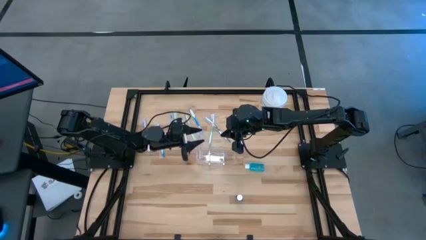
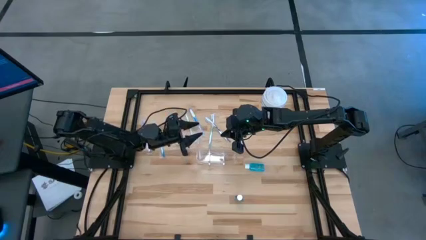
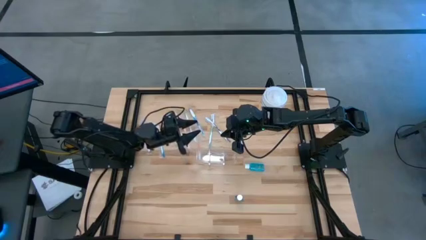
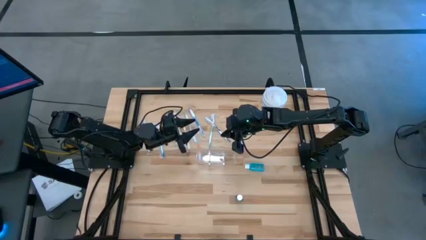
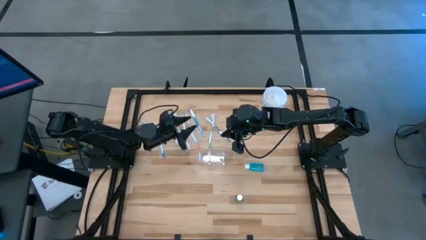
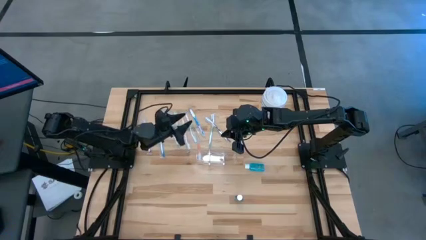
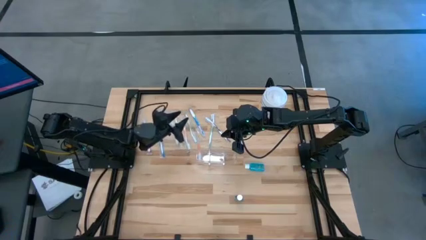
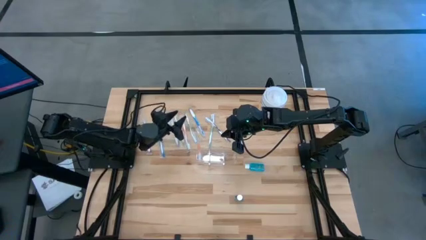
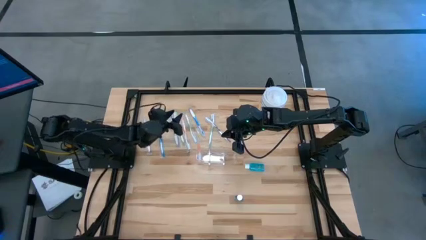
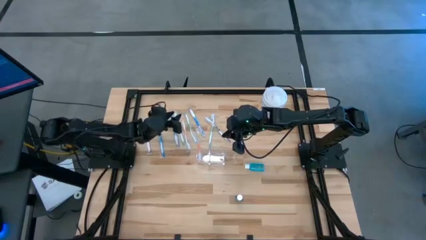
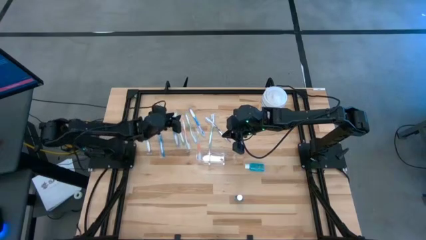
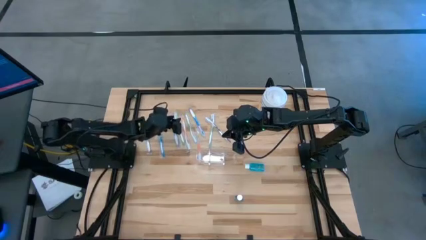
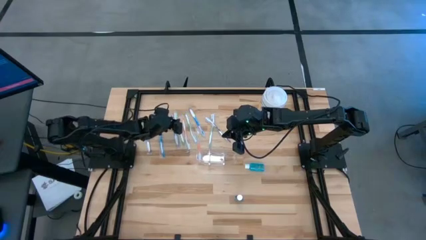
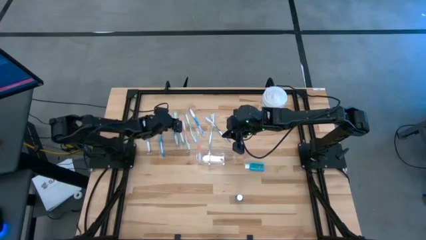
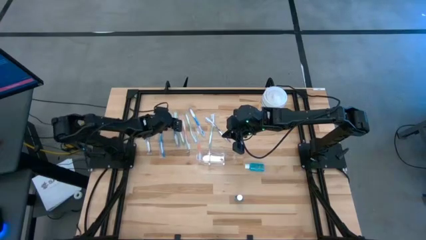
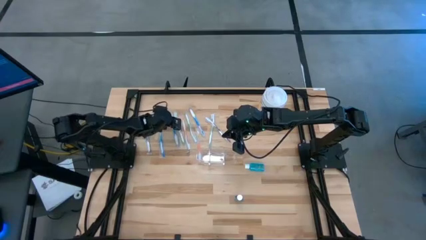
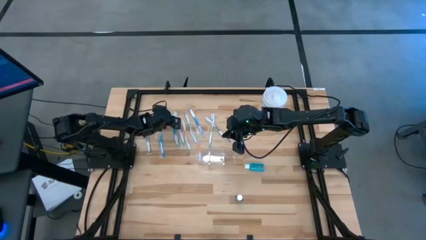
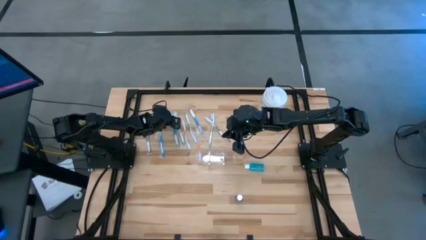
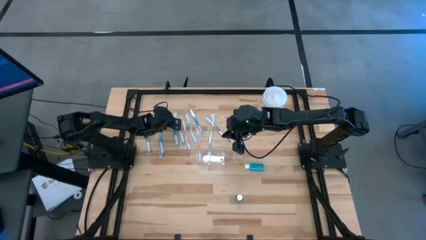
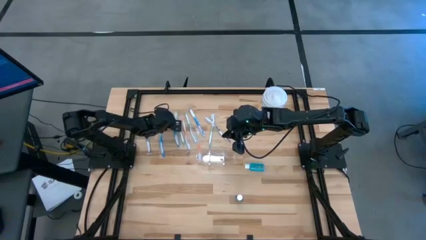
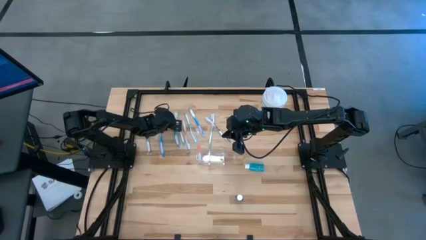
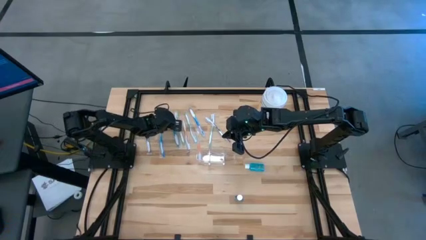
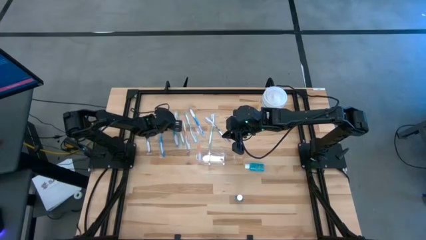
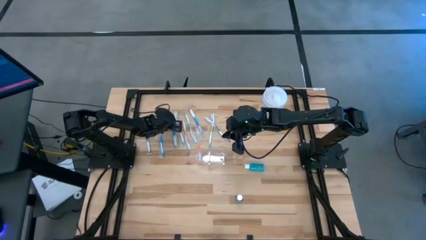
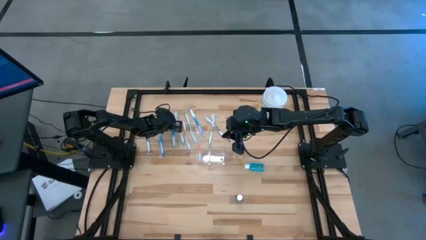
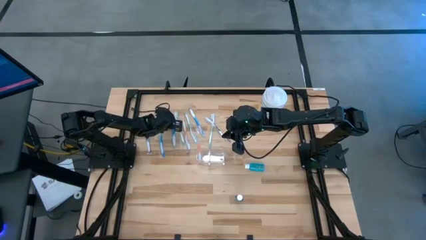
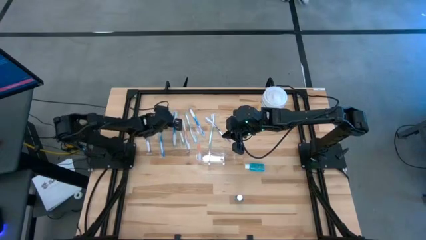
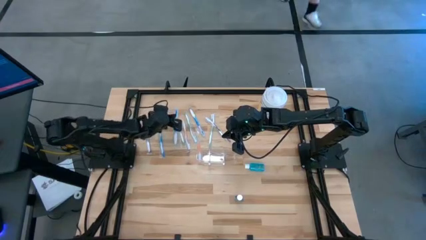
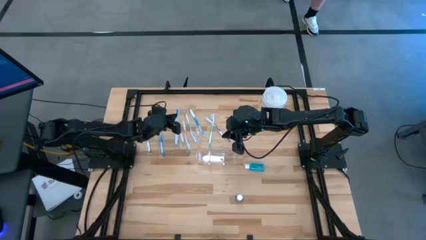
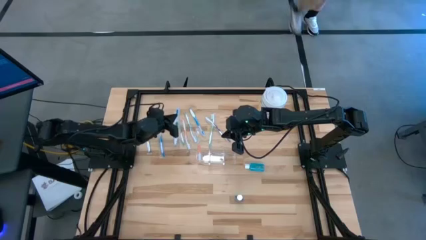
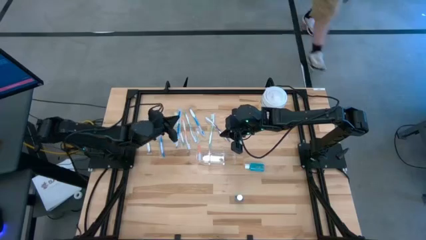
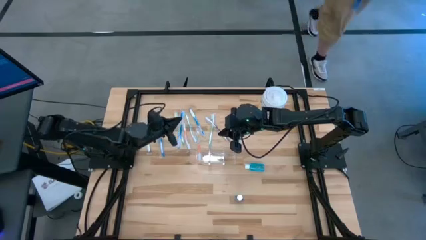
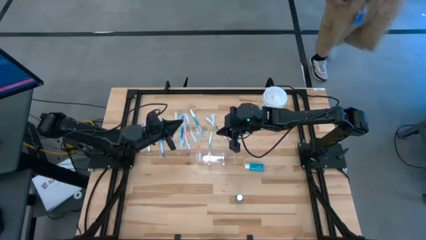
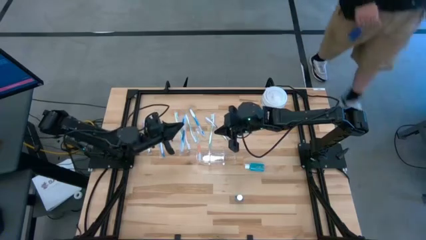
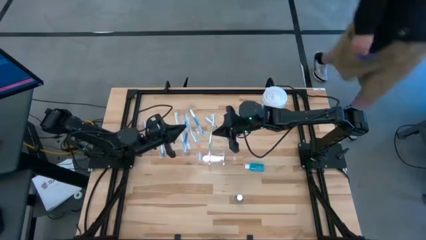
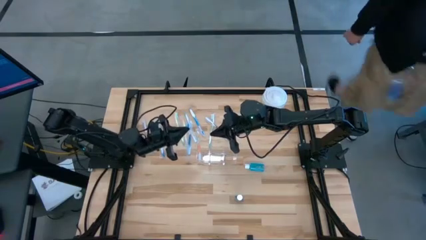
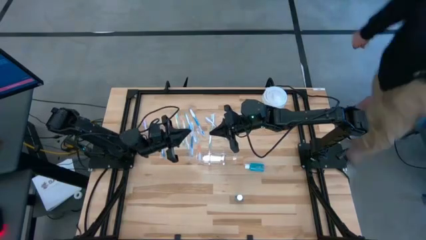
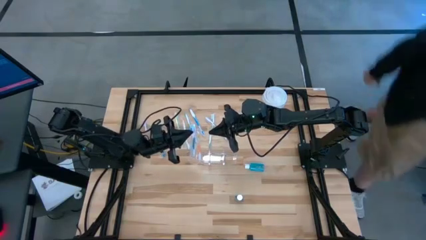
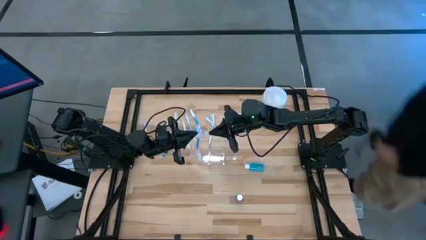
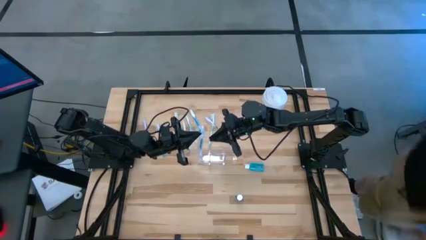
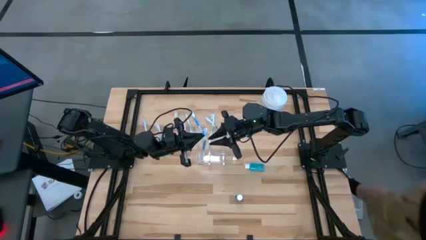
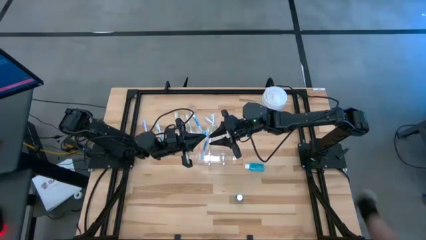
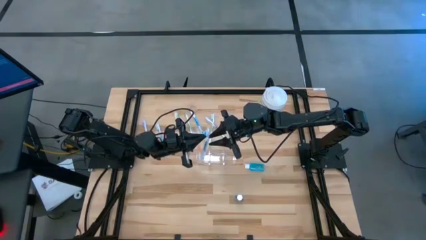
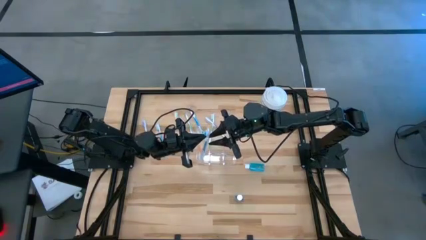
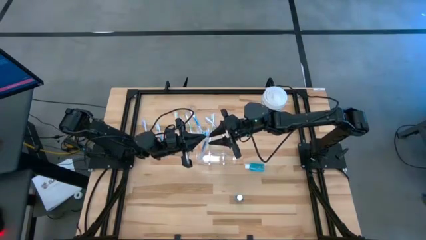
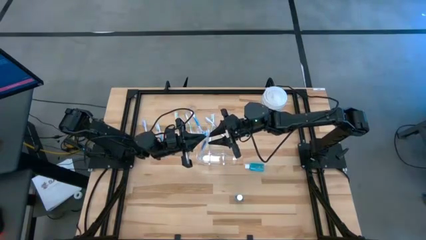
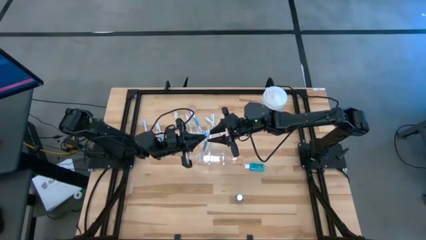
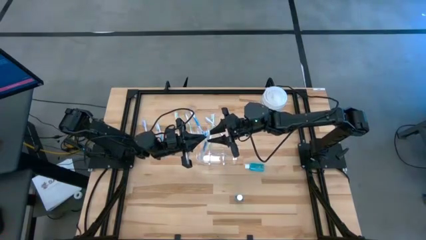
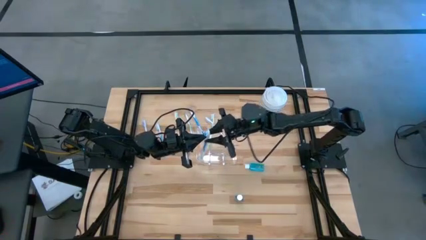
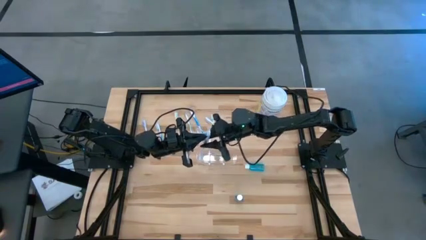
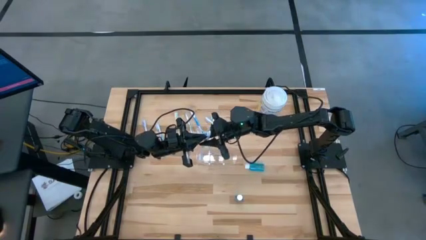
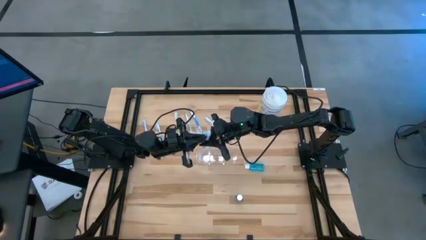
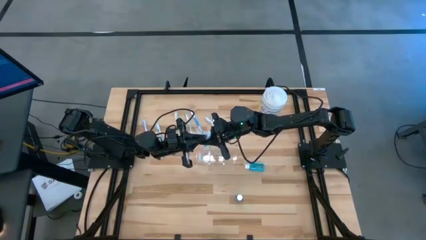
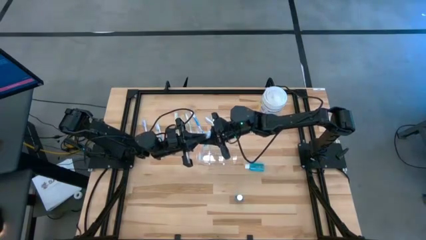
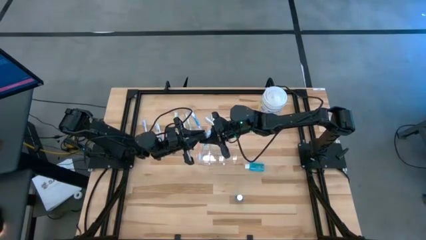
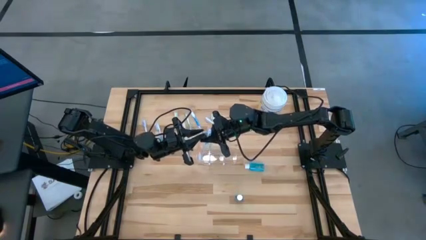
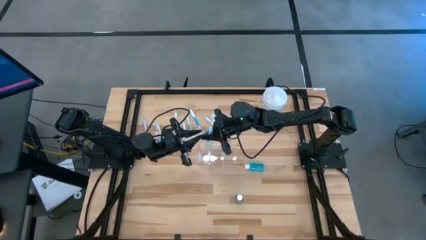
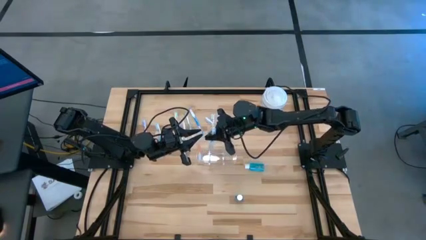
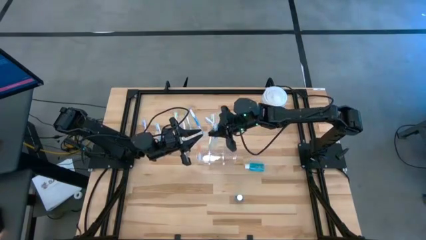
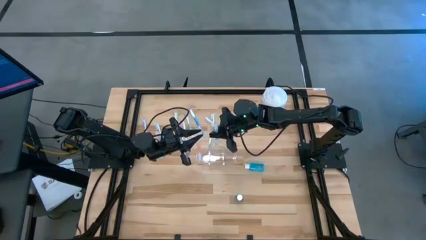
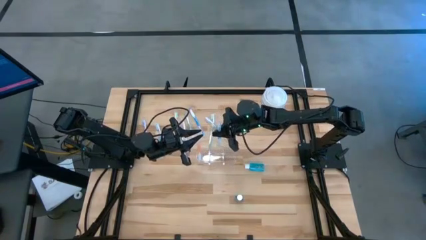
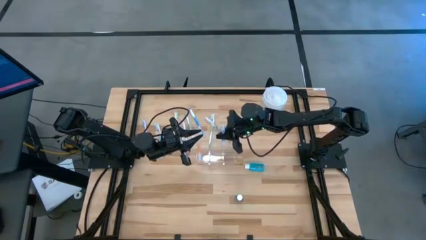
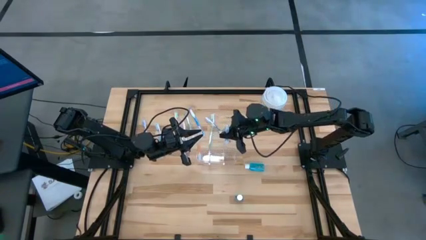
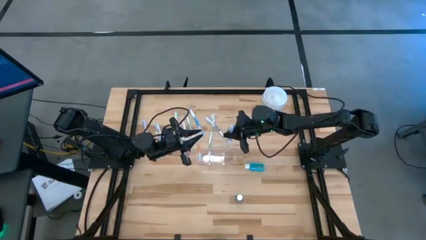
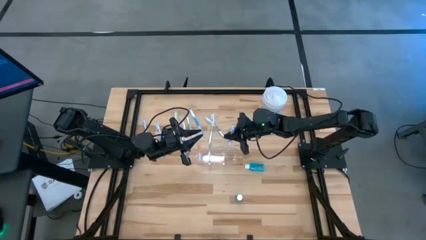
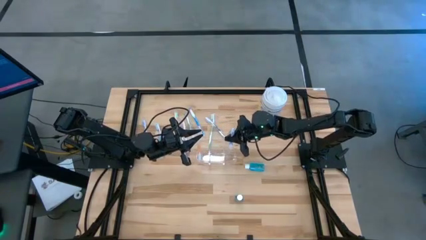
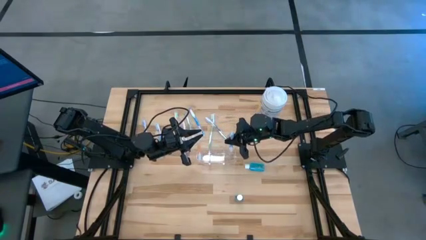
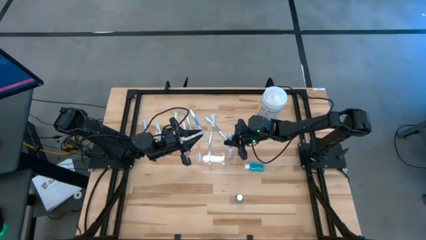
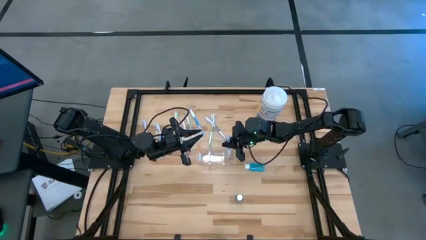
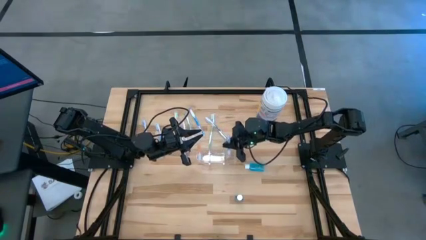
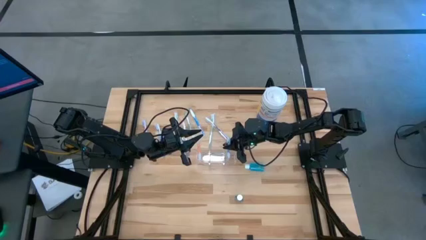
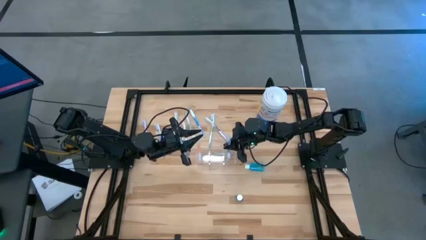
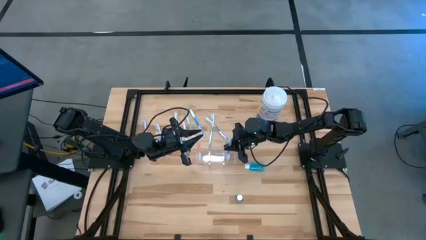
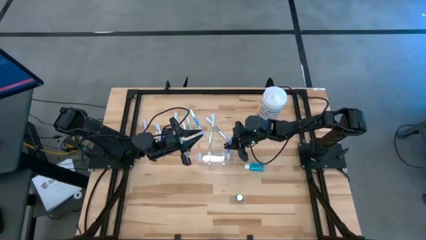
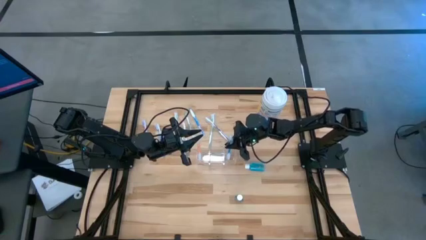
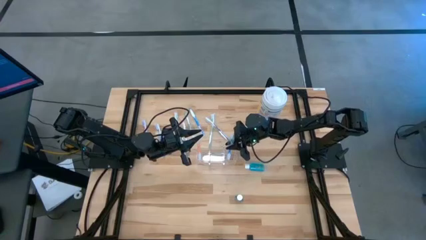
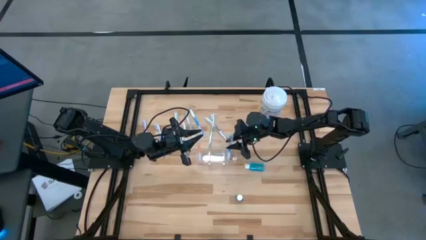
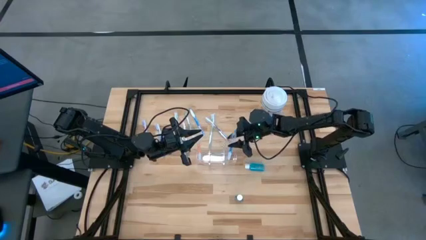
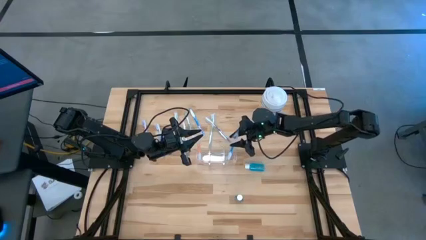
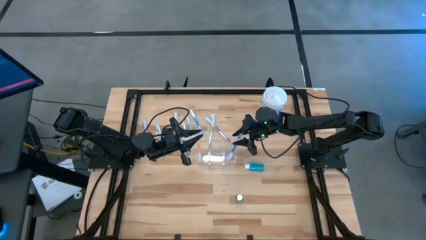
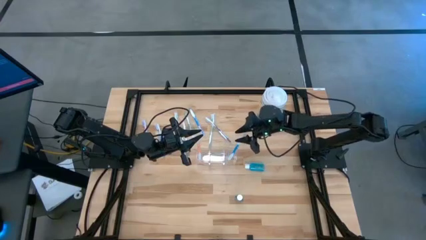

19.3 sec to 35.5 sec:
Task: Pick & Place toothbrushing station
Put the middle blue toothbrush into the transparent organizer
